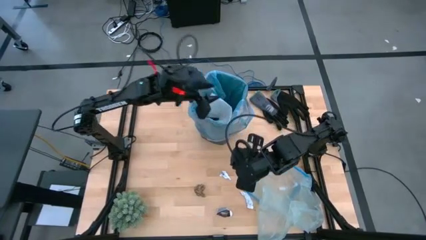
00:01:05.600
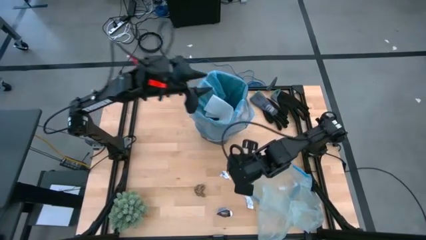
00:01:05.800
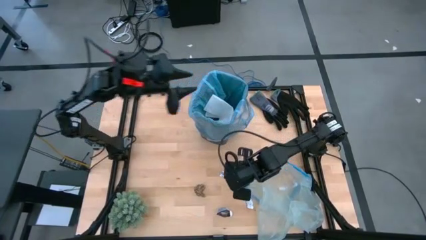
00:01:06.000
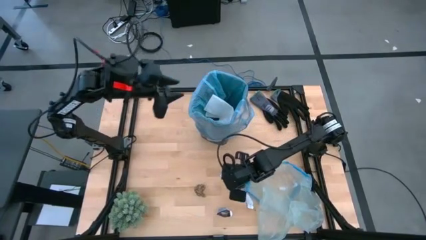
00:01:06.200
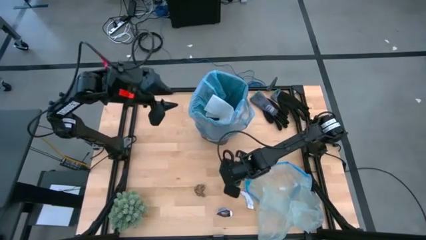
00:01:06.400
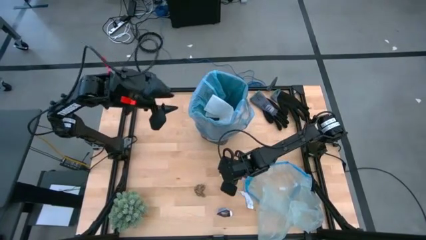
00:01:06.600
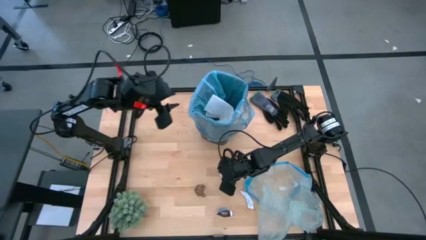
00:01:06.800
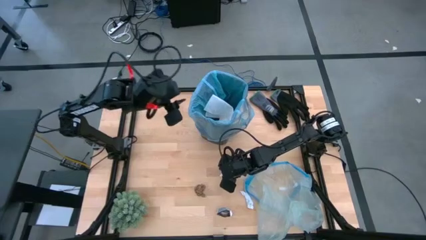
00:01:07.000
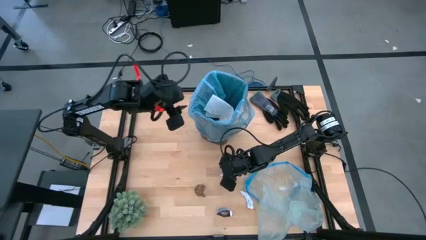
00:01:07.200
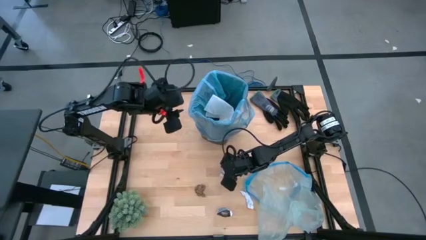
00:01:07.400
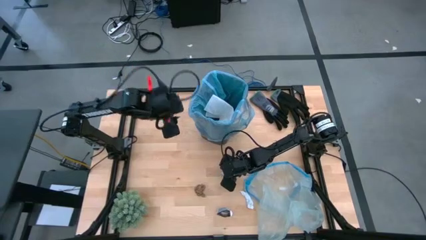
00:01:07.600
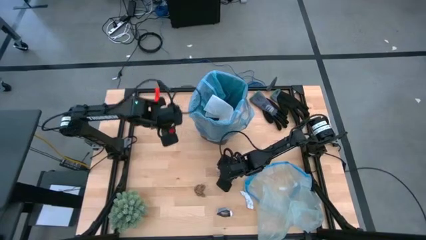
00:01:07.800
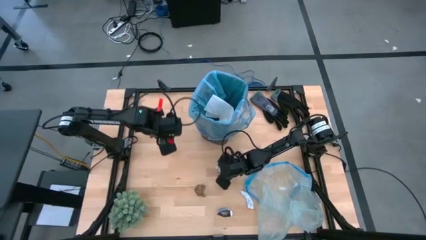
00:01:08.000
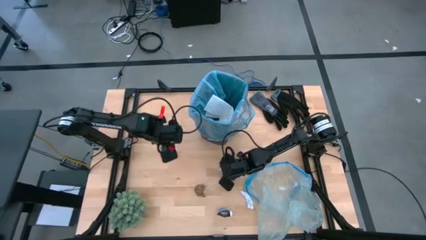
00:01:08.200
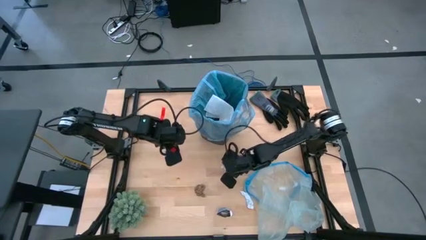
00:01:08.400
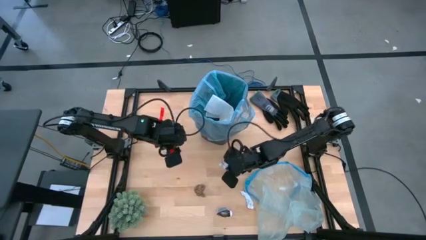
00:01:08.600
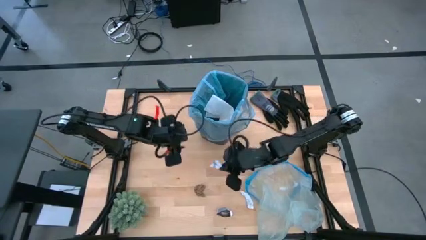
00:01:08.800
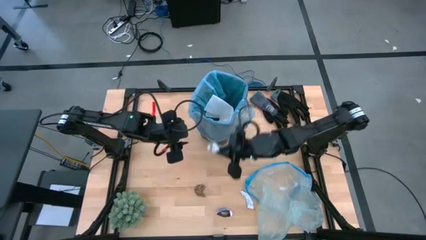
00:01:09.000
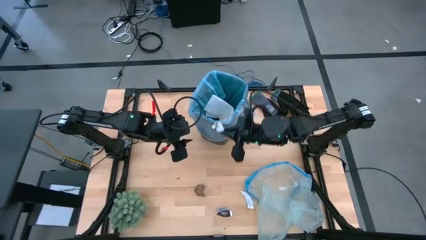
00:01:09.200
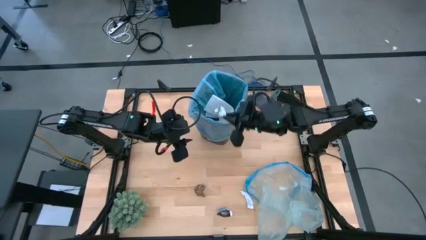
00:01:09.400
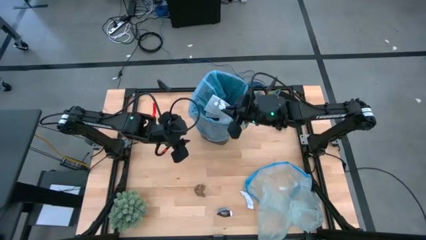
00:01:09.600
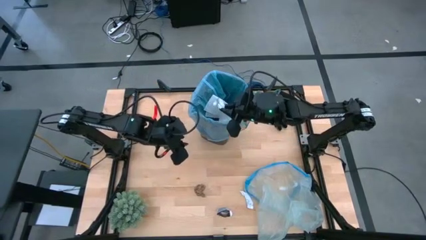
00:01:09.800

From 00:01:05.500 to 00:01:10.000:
Task: place trash/remove bag and relplace
Put the white paper into the trash bin

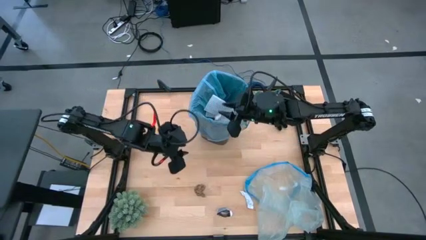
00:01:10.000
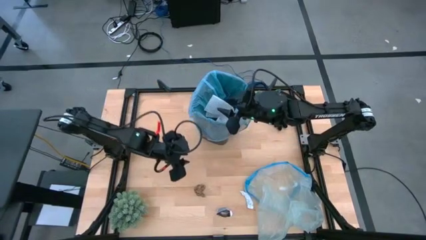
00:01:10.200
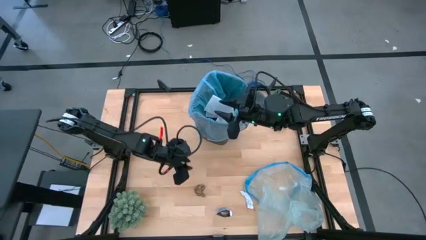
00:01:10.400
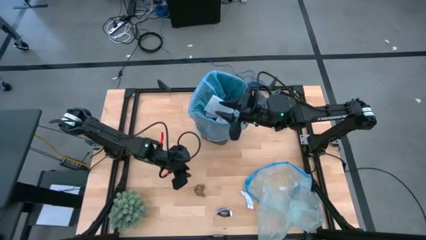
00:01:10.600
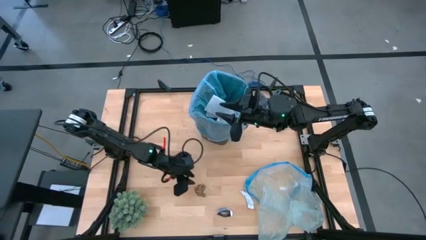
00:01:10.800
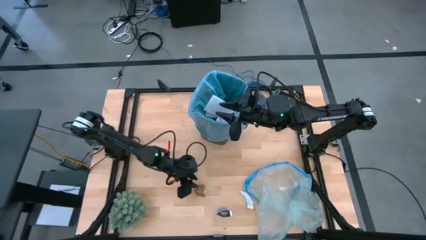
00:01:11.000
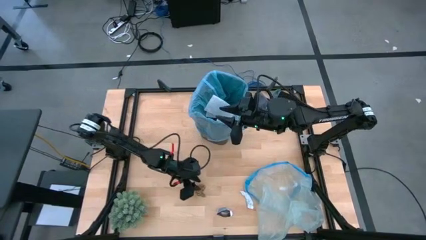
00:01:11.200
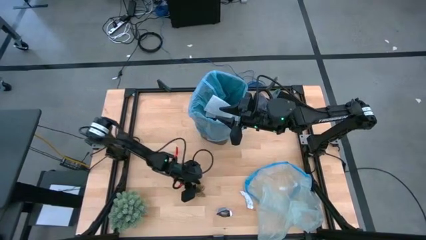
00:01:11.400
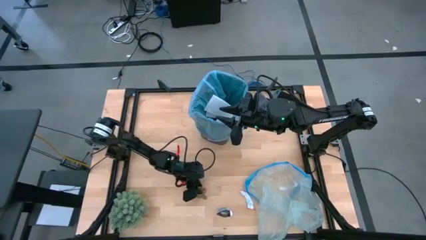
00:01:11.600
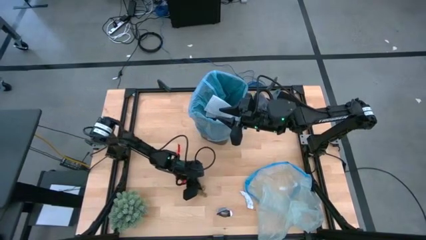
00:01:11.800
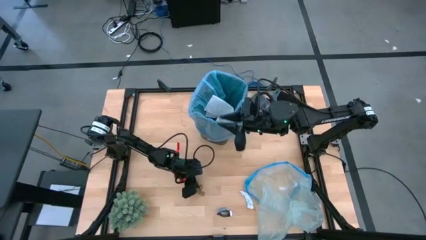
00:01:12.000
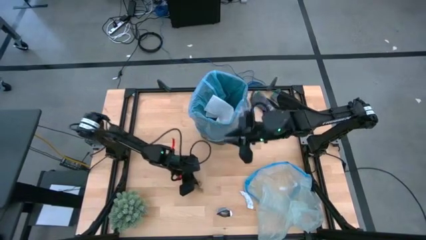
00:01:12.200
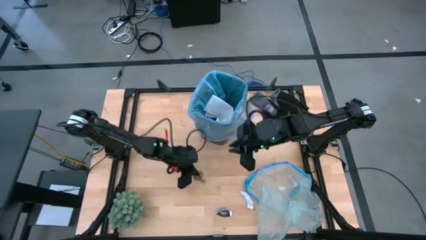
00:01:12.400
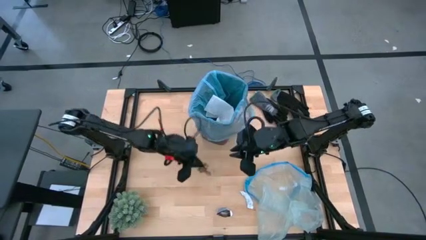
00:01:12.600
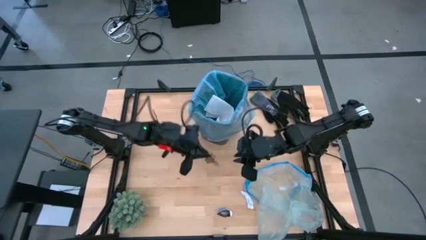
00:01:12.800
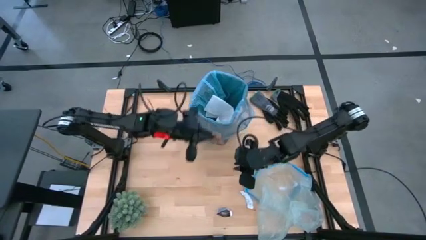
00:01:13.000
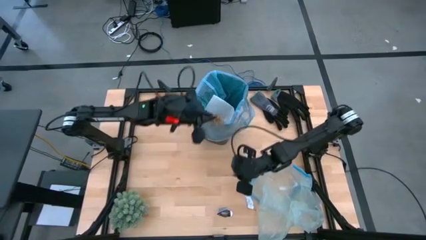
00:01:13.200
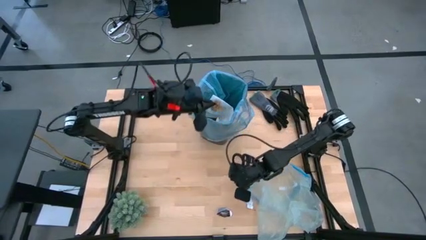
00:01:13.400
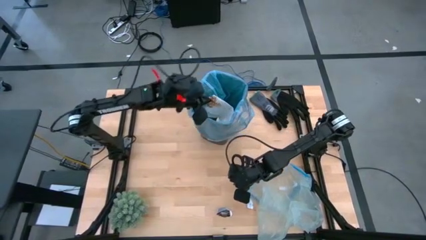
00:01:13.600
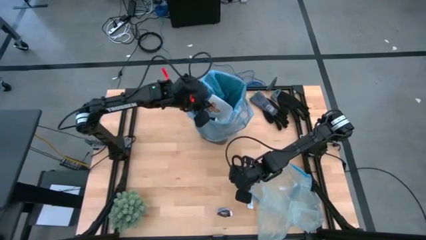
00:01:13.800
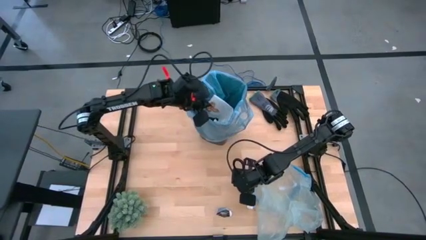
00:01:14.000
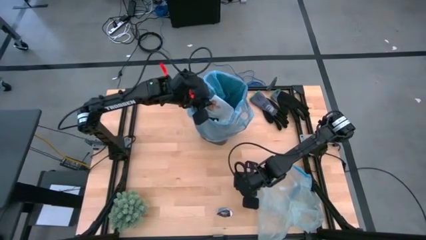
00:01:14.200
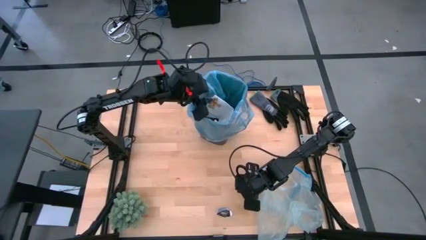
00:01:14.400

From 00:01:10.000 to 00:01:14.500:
Put the brown napkin into the trash bin

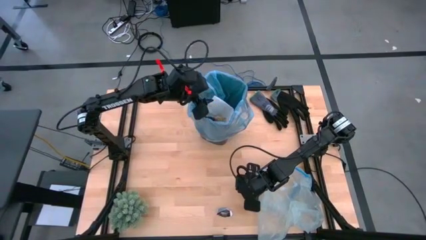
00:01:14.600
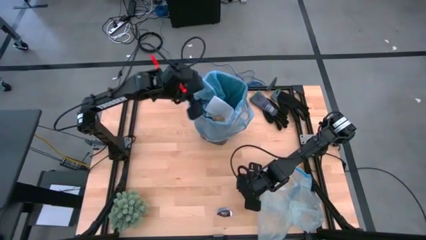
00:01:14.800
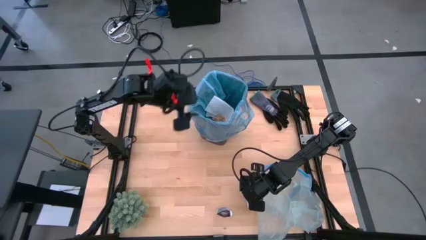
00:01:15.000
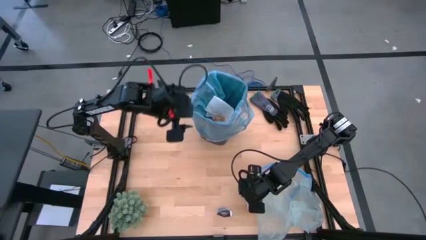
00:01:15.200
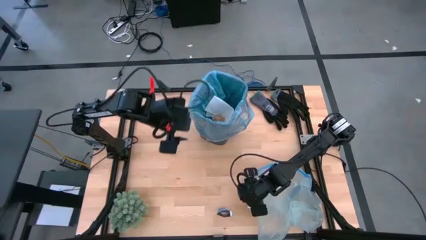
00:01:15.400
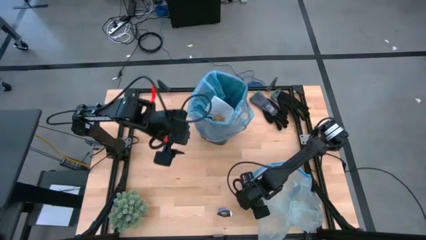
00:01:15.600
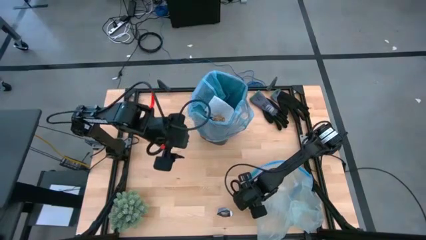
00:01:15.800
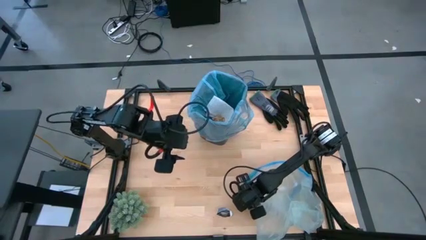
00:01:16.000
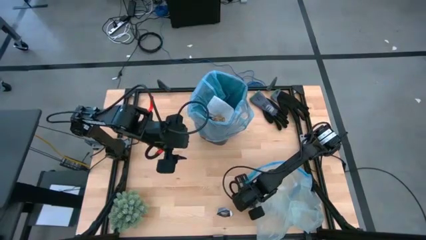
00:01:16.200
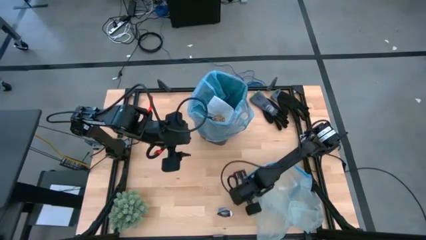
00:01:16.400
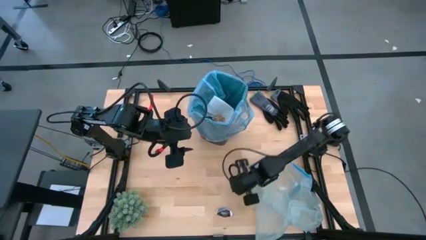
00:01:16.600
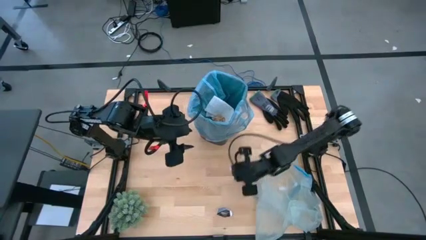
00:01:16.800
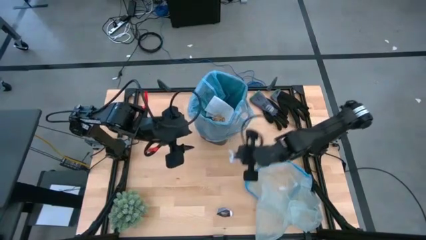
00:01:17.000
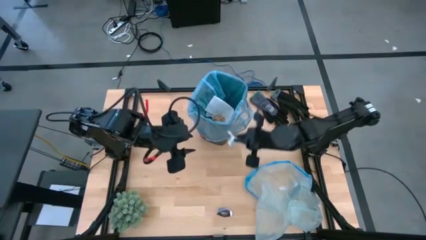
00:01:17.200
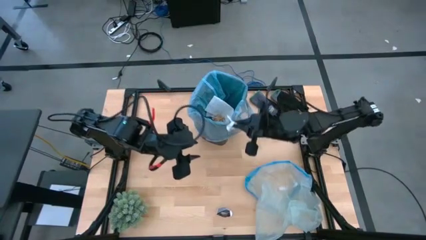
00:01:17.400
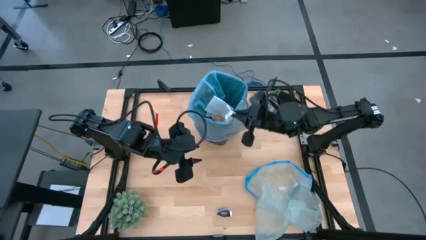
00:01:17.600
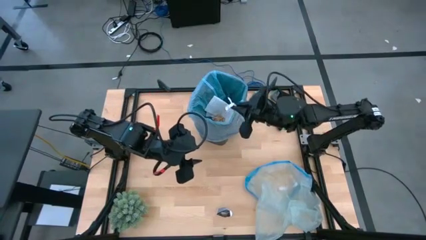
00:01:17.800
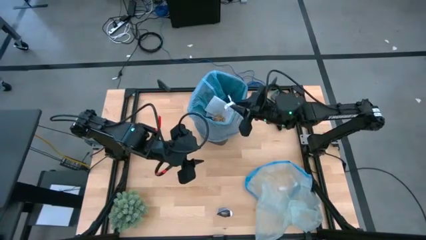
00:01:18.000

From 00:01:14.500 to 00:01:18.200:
Put the white paper into the trash bin

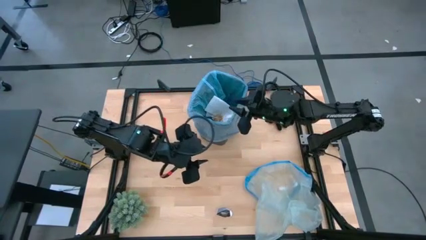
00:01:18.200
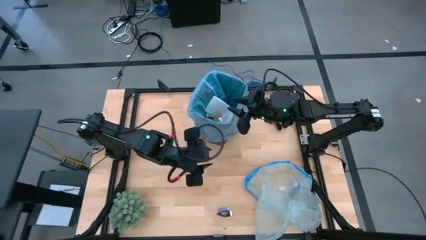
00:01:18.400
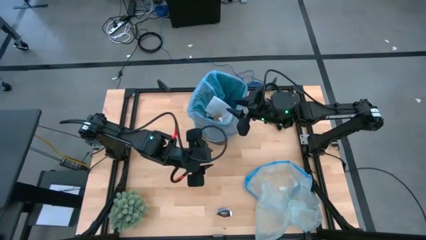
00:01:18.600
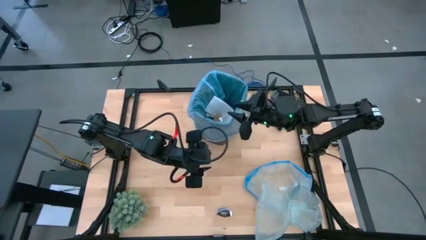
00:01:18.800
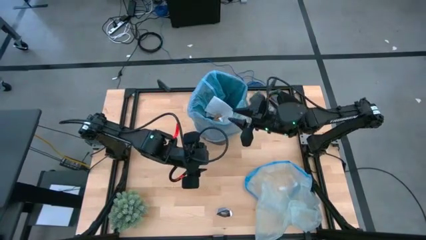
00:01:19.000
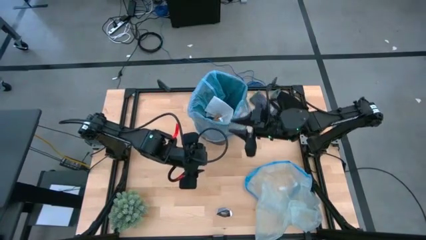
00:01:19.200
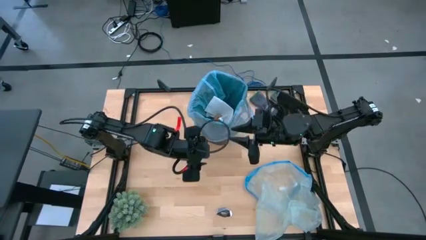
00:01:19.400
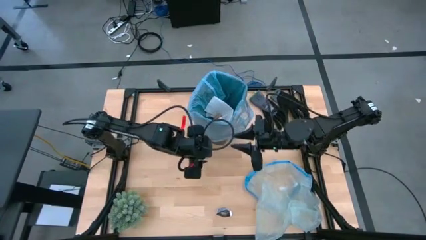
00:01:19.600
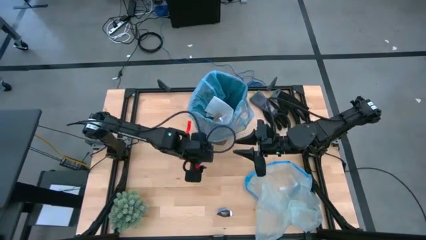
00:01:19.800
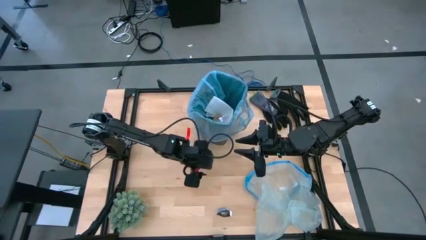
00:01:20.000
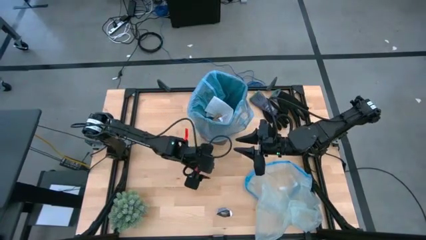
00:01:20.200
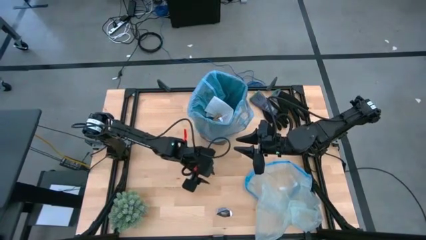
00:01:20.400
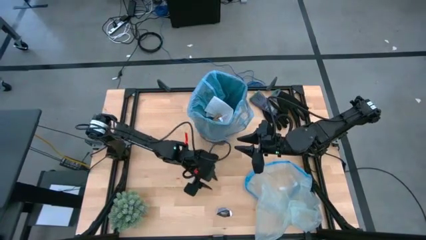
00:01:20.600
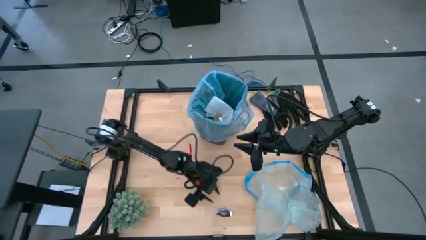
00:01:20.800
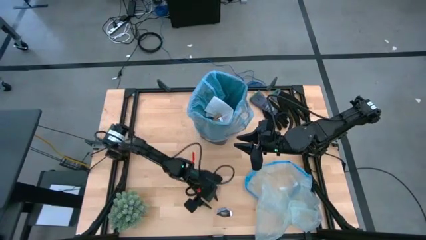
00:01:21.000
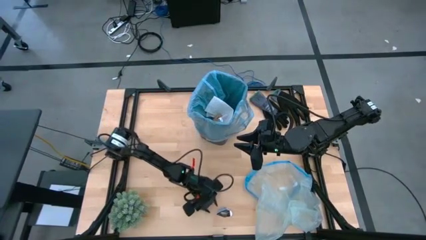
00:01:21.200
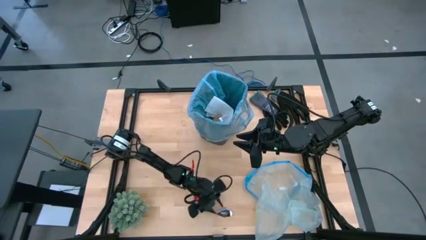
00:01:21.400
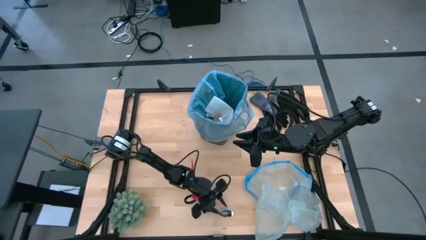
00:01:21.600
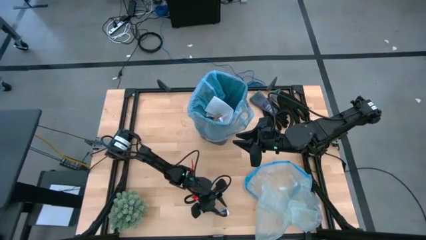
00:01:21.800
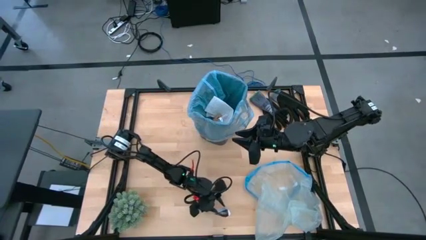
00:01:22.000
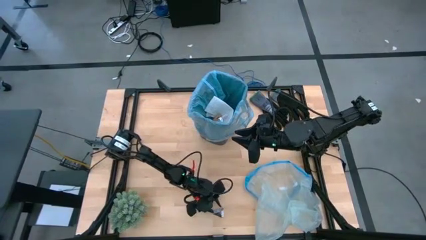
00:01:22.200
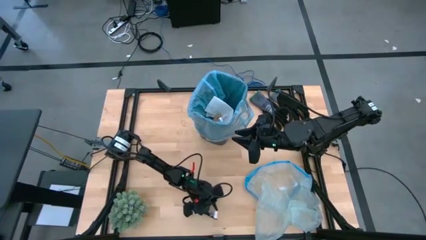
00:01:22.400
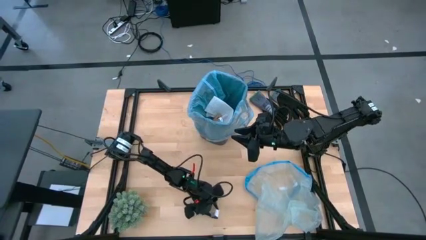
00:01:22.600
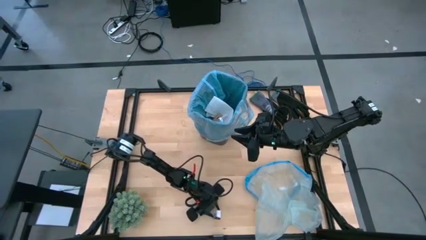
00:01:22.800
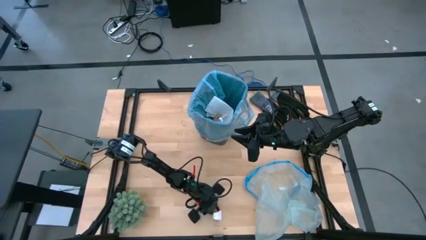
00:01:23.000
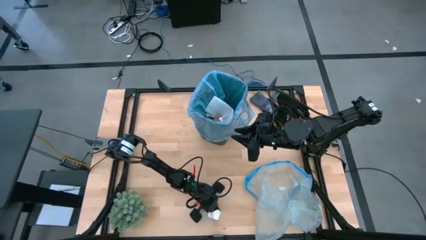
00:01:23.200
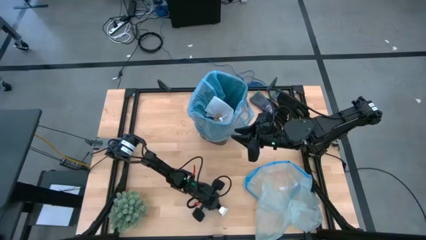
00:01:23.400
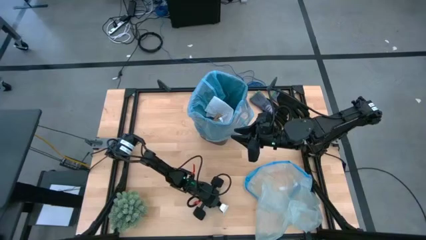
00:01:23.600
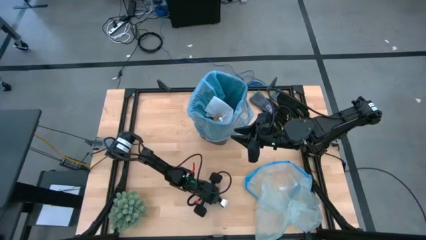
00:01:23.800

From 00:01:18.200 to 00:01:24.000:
Put the plastic wrapper into the trash bin
